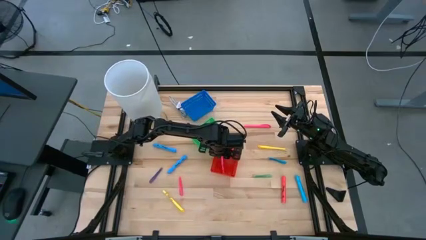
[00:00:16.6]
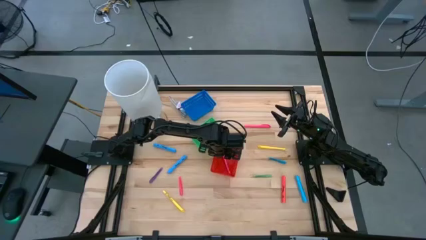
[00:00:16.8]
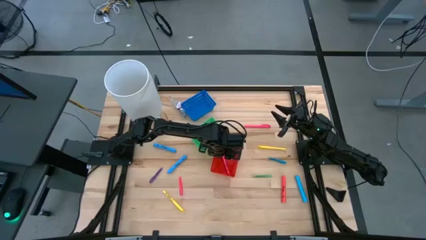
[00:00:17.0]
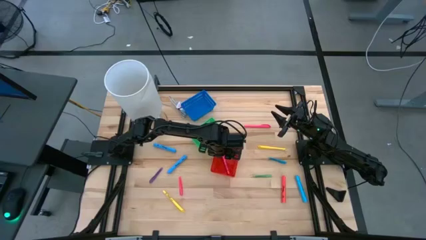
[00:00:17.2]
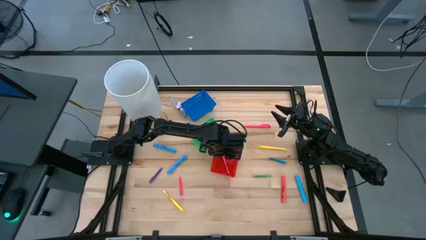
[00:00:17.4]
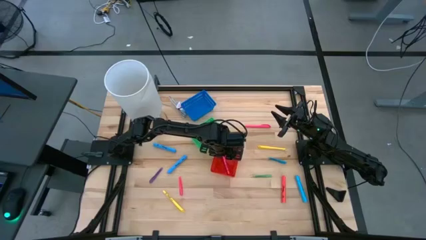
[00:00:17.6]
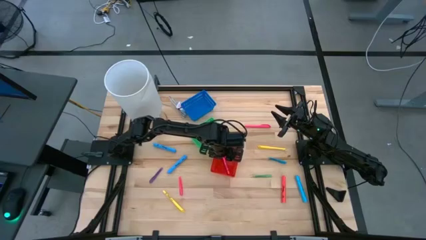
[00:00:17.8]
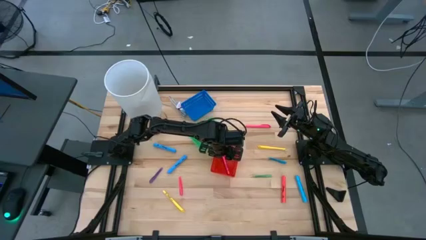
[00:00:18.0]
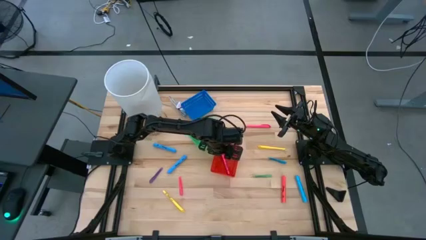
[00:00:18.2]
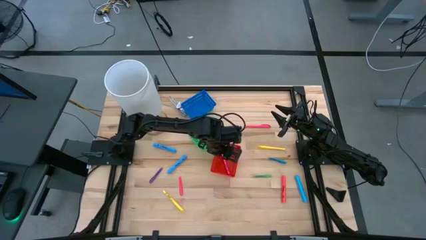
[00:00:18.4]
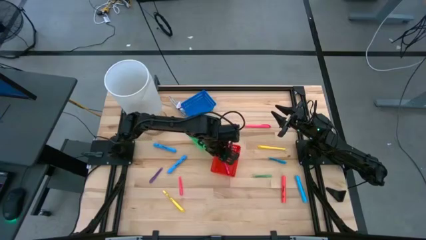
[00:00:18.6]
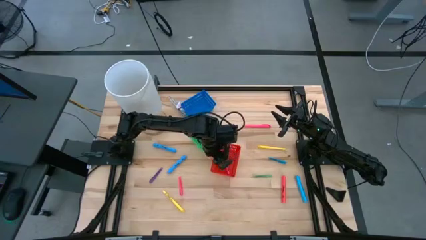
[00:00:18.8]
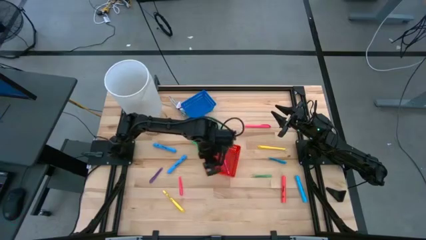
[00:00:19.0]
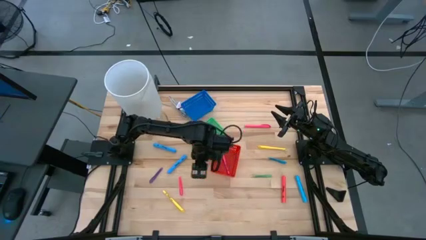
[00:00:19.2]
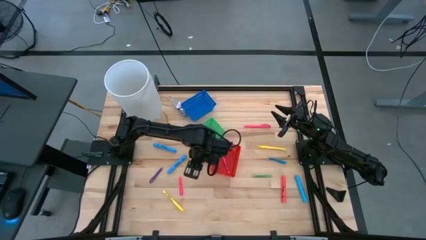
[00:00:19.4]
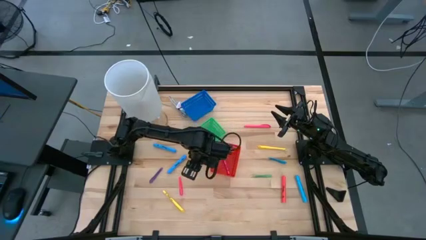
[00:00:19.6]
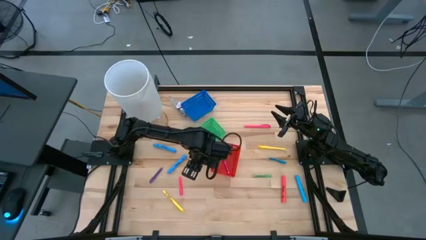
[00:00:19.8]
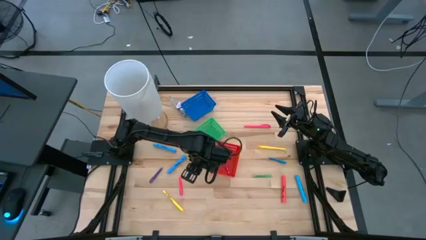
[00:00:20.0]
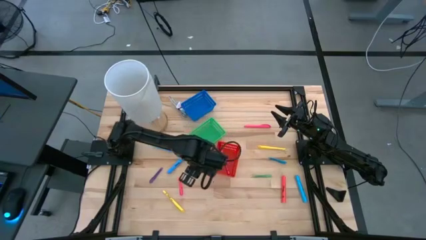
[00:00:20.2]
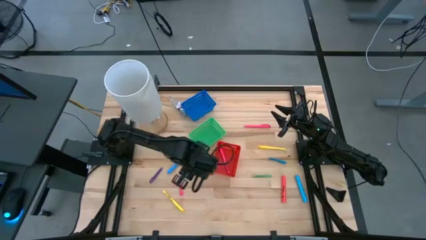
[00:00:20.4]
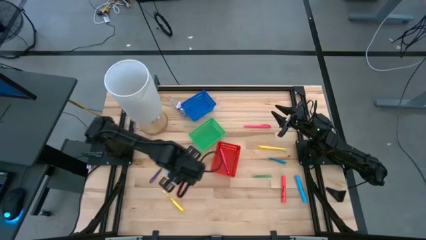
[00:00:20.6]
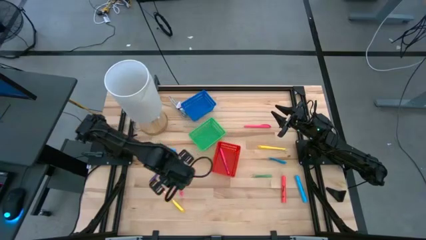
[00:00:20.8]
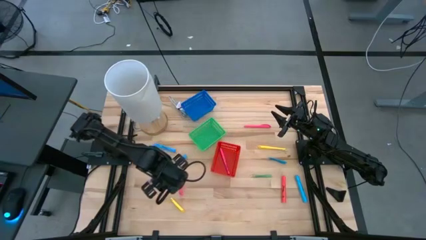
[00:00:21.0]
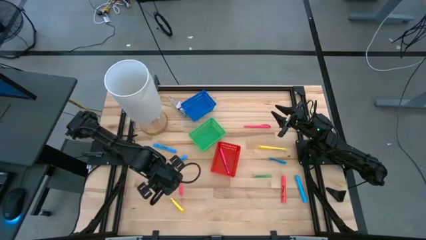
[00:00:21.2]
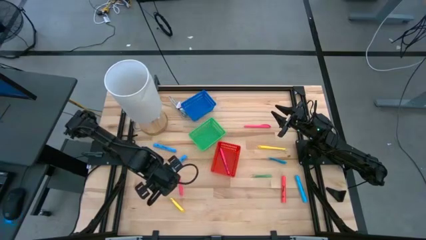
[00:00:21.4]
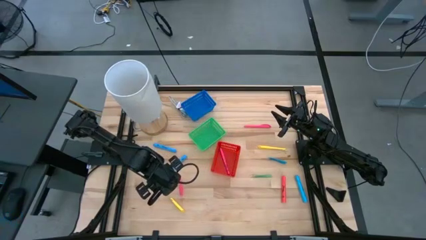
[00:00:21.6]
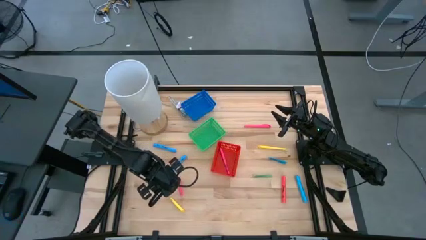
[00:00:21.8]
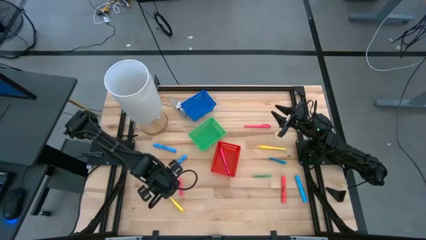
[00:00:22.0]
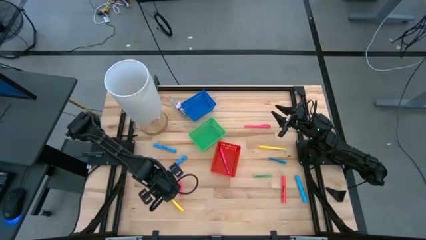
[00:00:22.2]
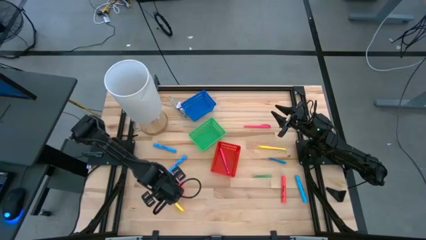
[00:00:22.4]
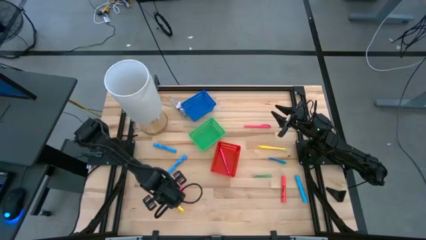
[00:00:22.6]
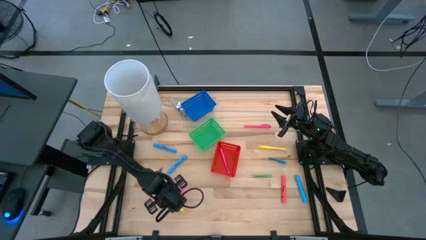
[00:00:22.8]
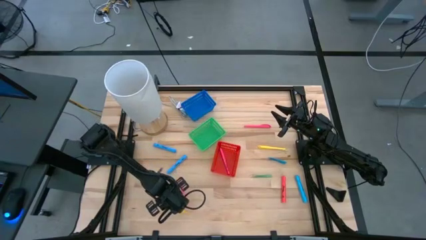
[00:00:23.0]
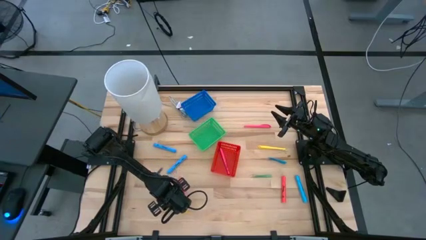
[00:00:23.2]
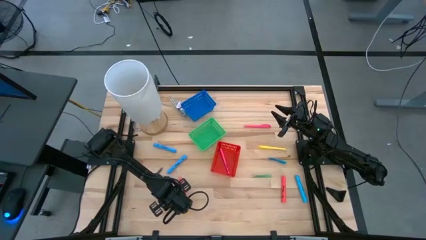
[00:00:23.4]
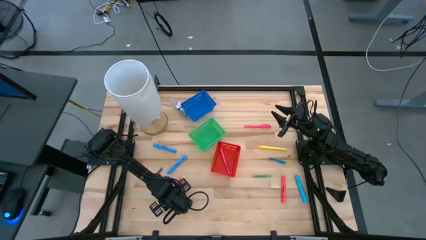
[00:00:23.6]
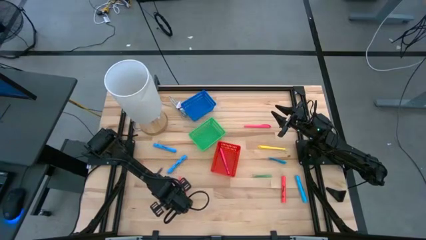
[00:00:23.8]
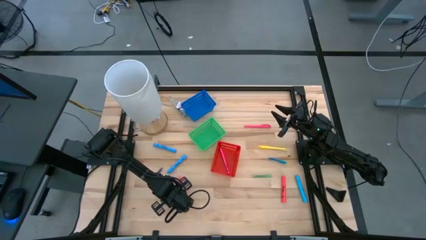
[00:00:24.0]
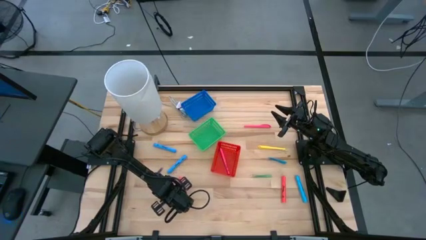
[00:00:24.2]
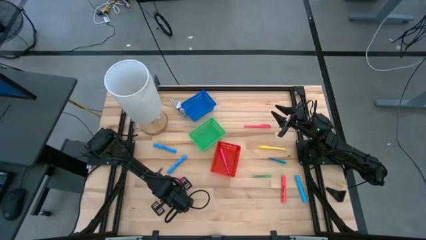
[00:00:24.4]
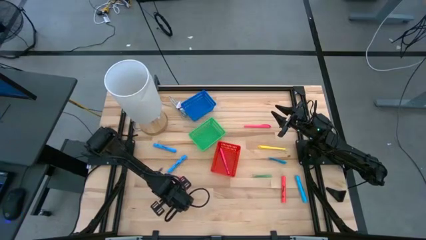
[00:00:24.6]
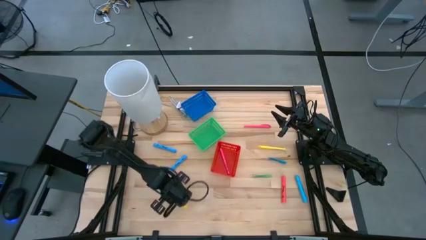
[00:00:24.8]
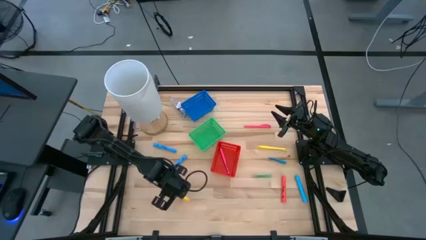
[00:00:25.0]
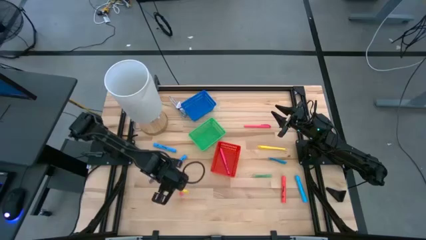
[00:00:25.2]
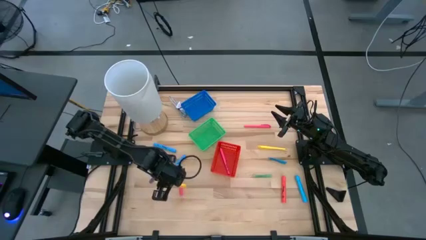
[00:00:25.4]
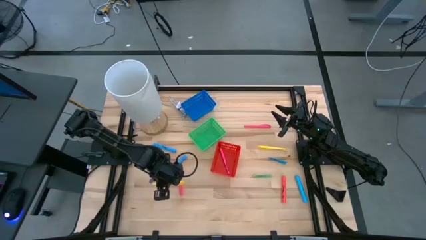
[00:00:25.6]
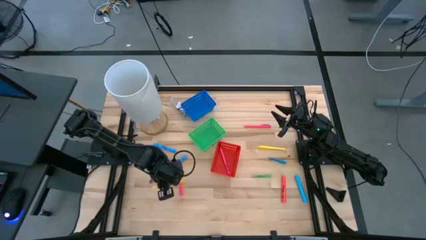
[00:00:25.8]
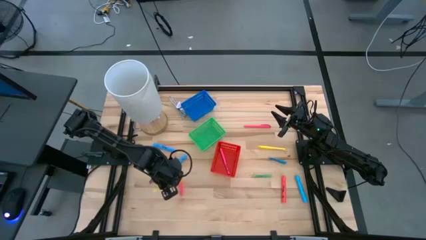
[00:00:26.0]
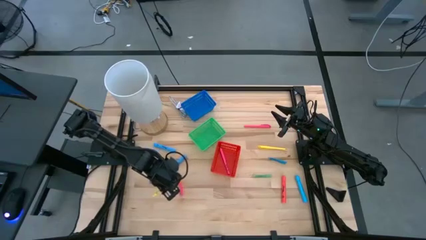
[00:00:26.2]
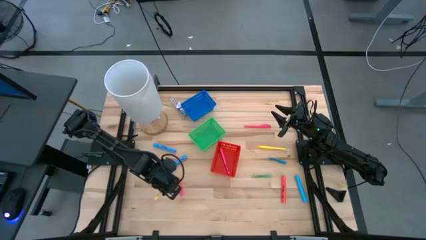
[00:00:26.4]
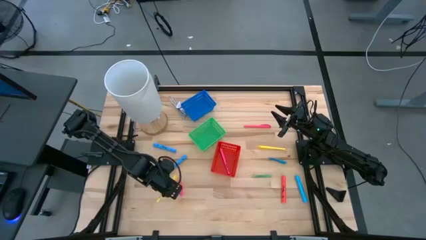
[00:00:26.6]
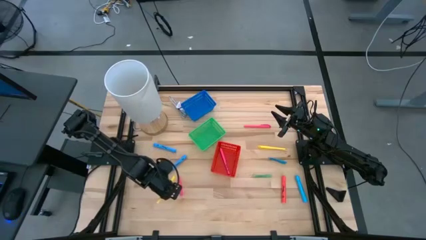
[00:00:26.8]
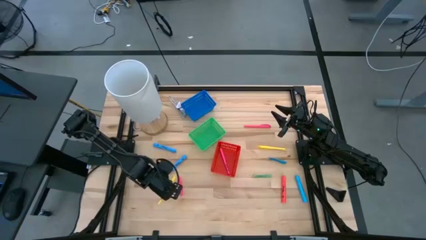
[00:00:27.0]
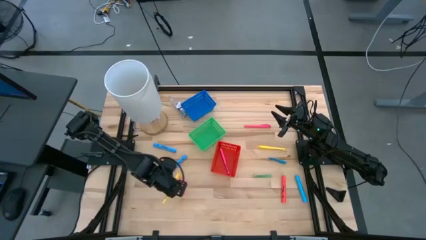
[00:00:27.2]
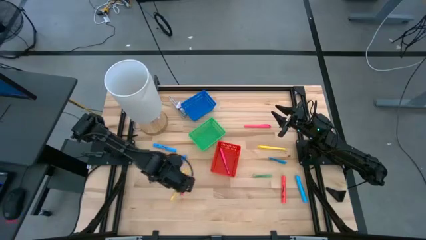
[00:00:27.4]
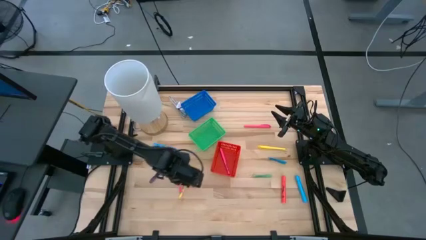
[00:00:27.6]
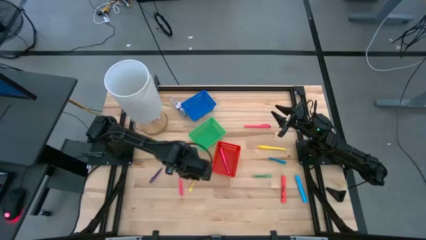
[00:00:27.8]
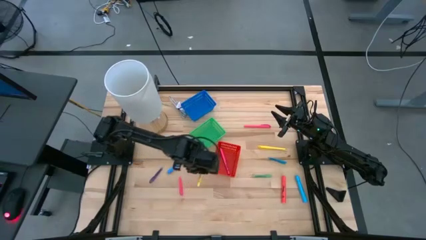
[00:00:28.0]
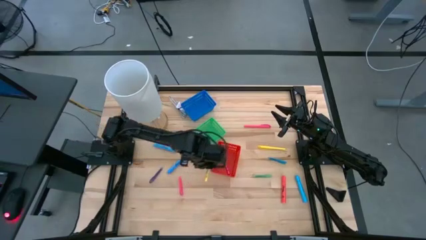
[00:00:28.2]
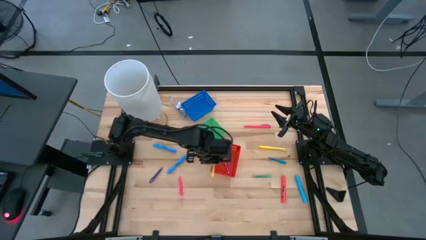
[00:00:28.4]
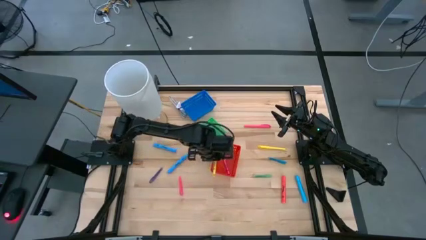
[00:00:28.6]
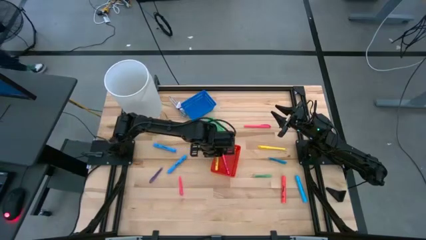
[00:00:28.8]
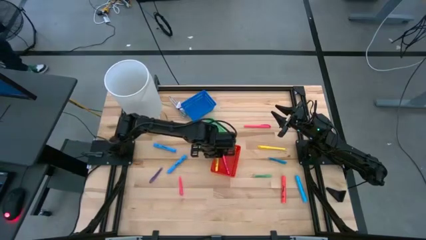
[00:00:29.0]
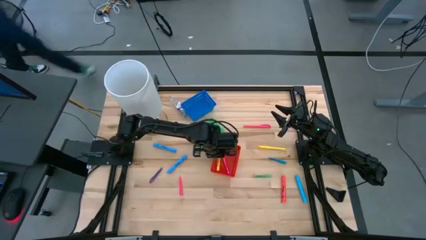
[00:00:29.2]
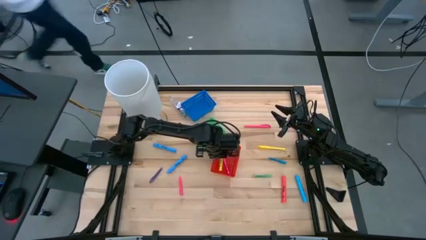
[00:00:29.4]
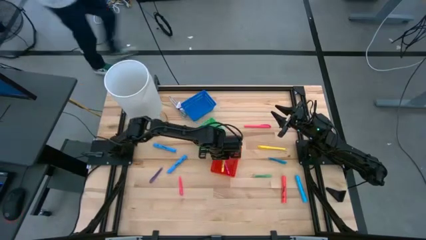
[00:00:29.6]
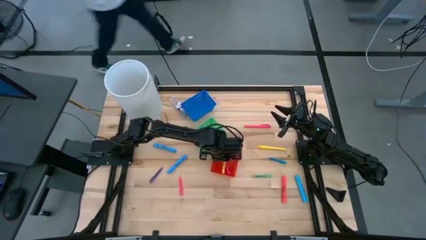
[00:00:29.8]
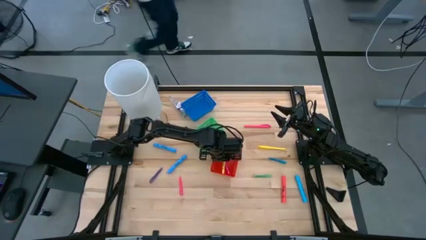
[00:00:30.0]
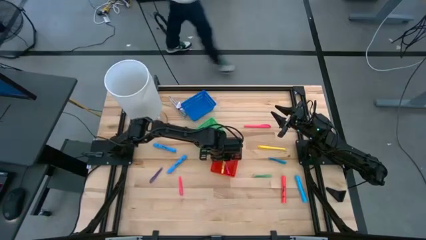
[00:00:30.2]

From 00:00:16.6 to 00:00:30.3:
Task: Pick & Place Markers
Put the bottom yellow pen into the red bin
